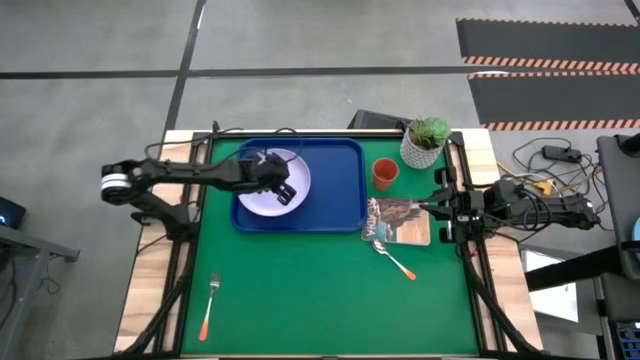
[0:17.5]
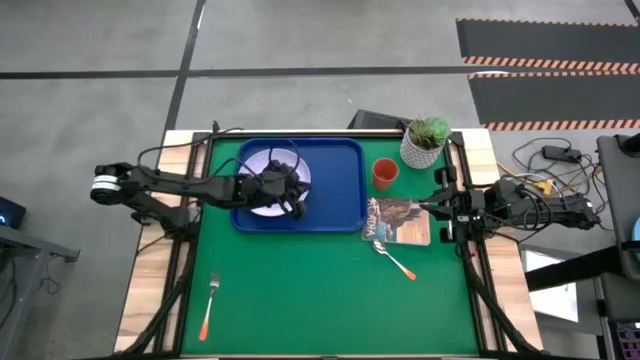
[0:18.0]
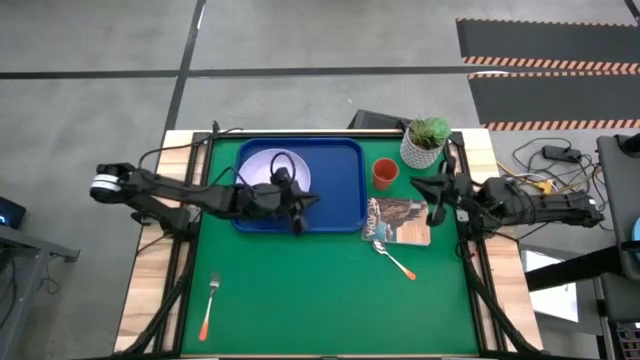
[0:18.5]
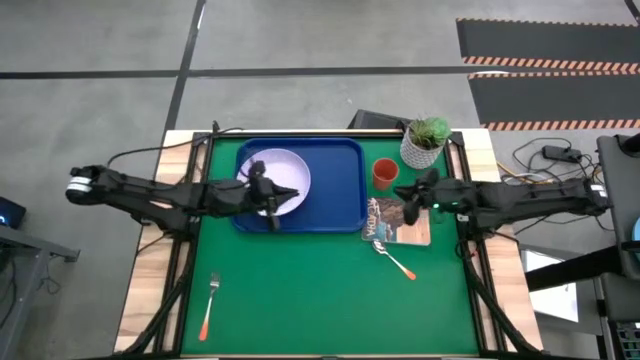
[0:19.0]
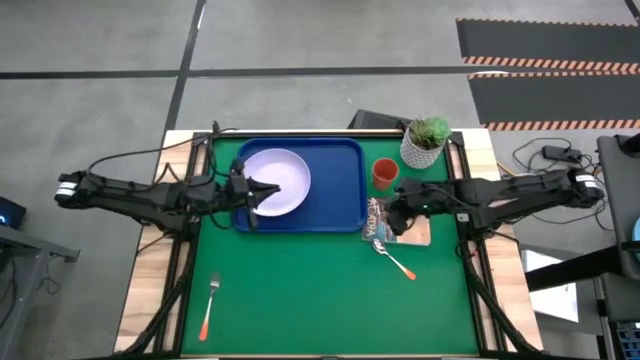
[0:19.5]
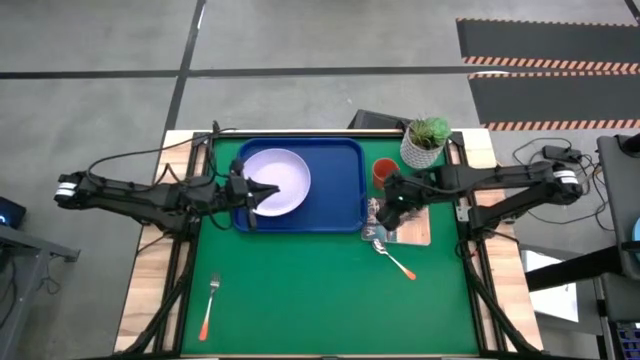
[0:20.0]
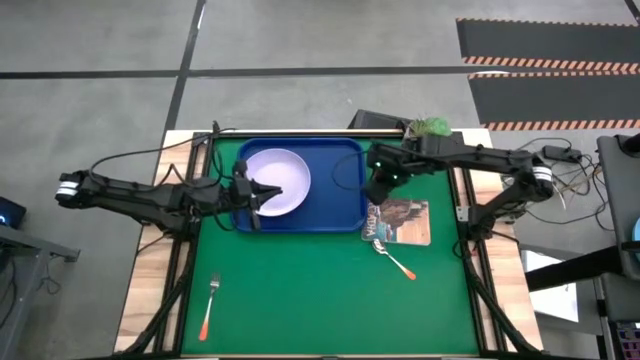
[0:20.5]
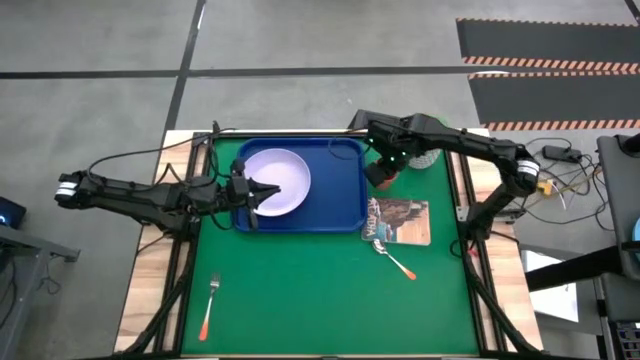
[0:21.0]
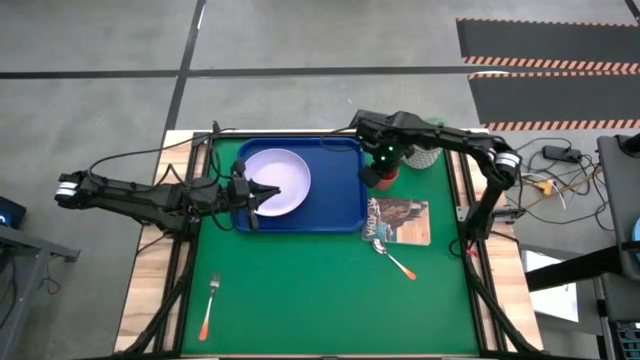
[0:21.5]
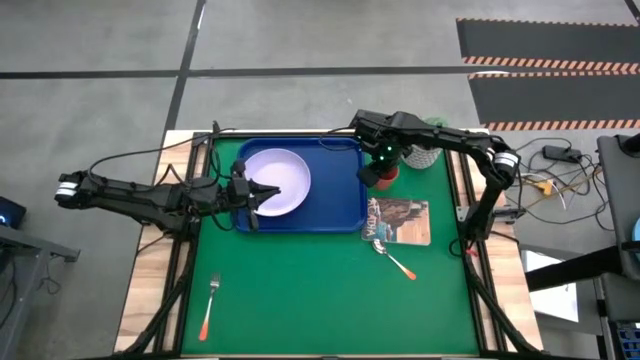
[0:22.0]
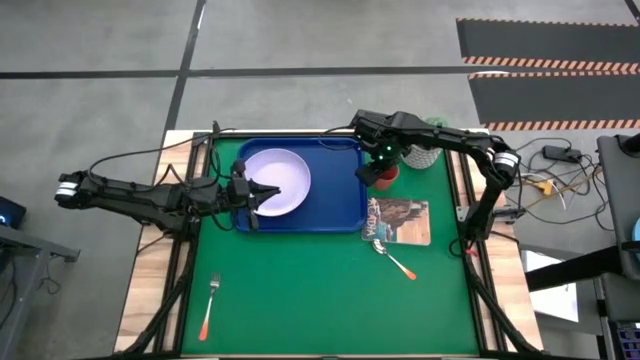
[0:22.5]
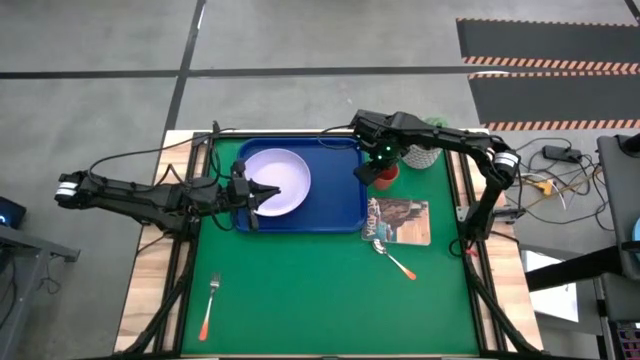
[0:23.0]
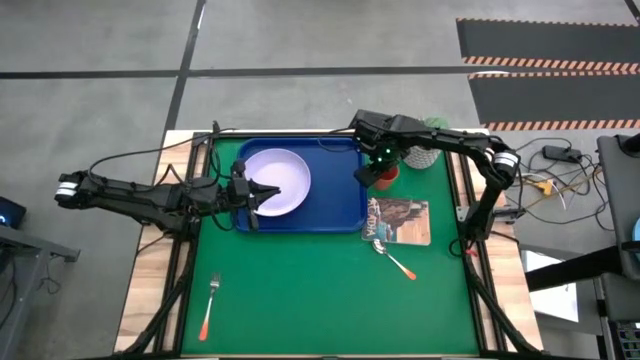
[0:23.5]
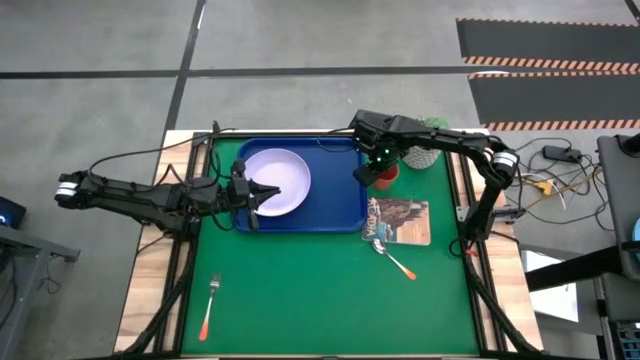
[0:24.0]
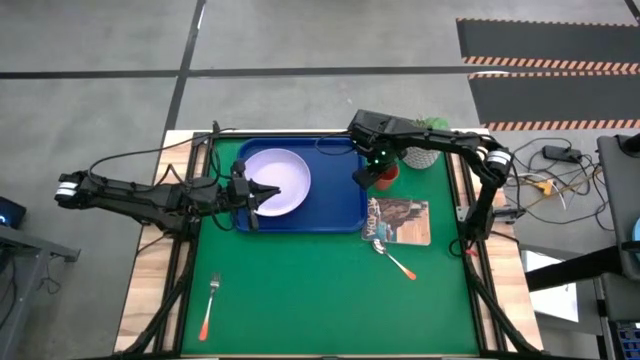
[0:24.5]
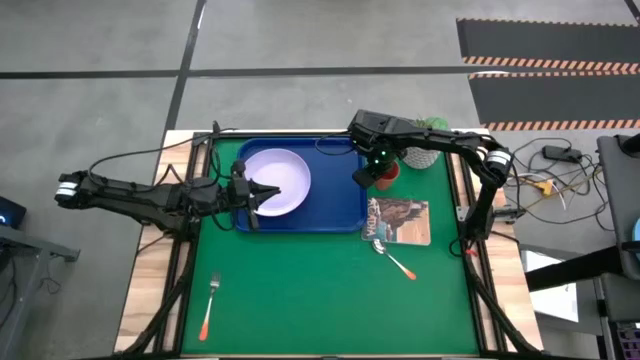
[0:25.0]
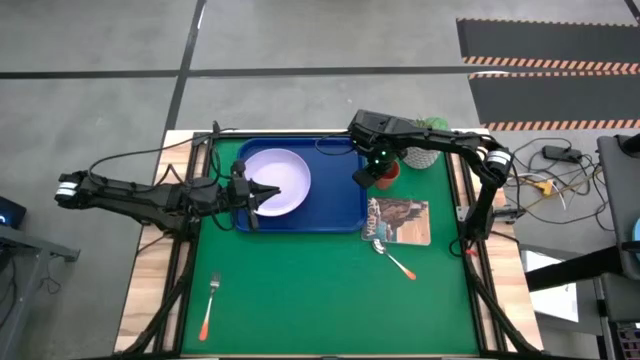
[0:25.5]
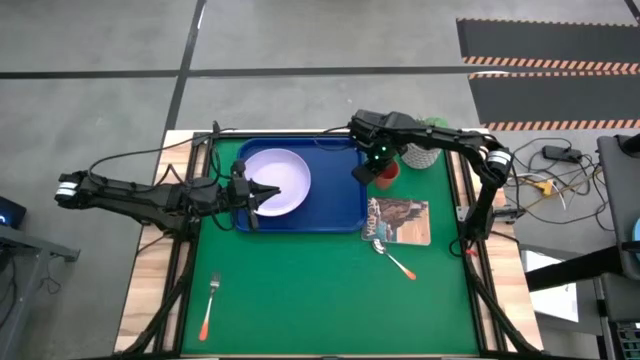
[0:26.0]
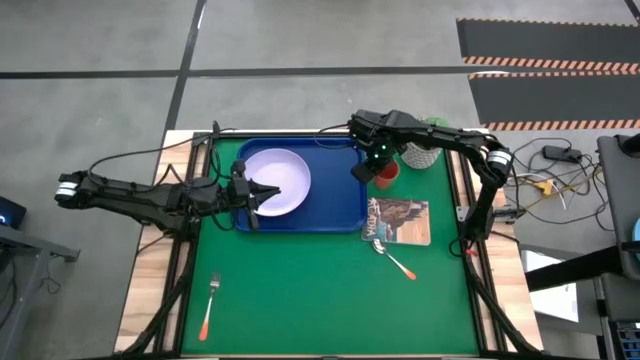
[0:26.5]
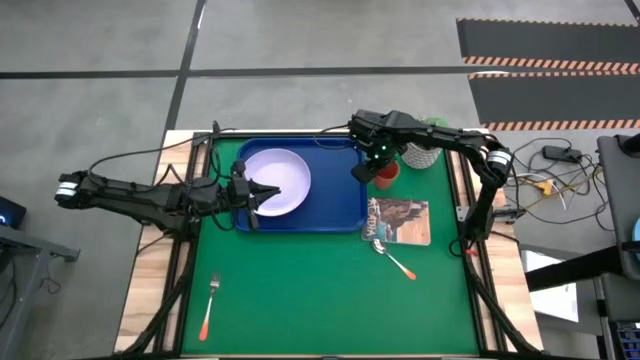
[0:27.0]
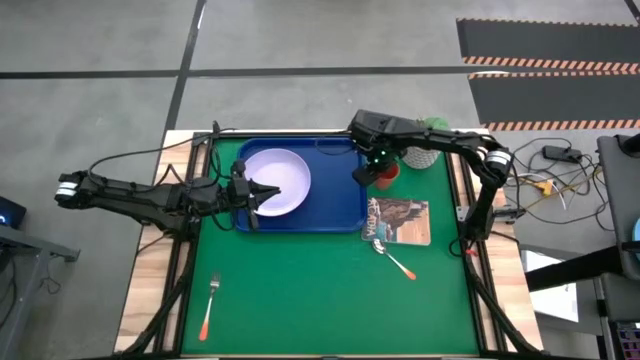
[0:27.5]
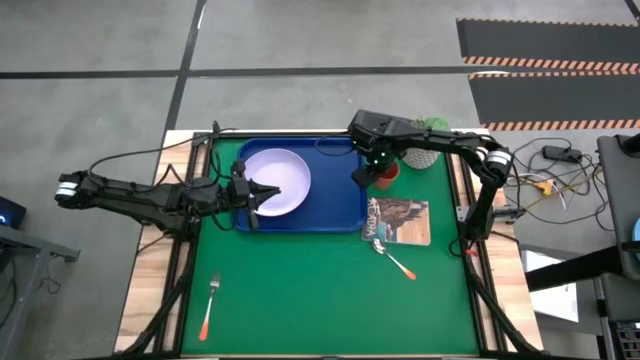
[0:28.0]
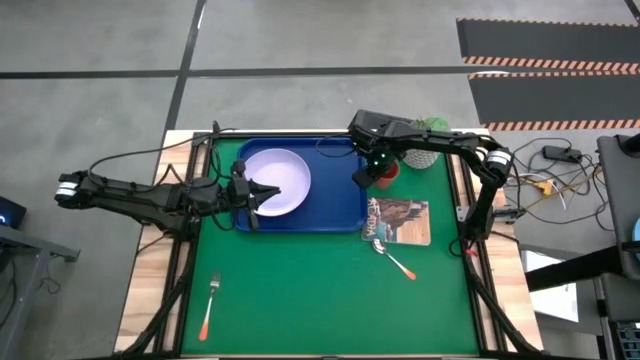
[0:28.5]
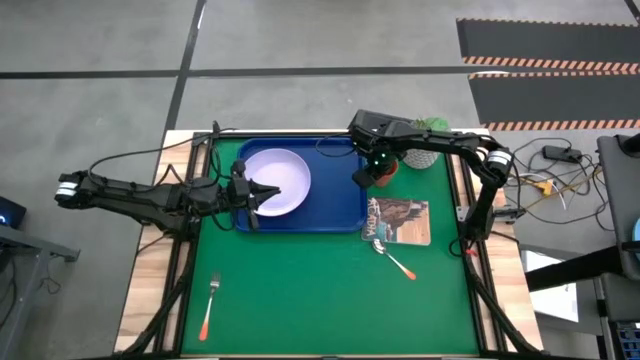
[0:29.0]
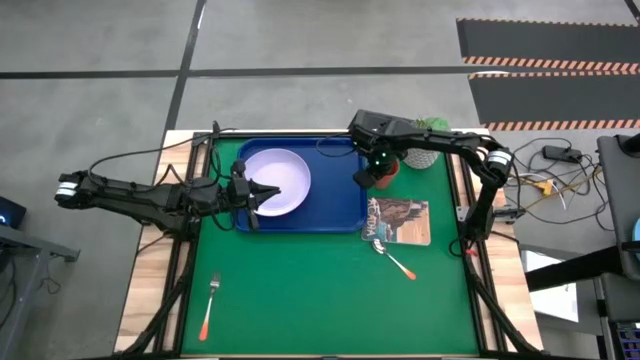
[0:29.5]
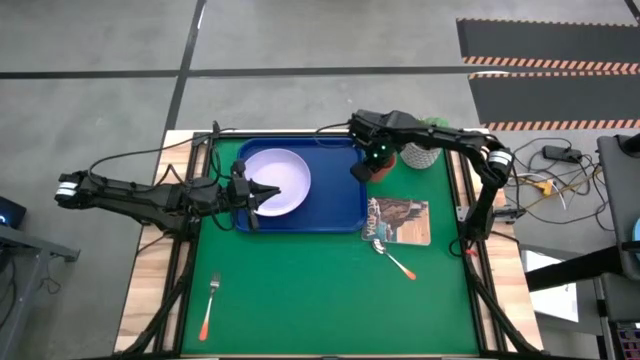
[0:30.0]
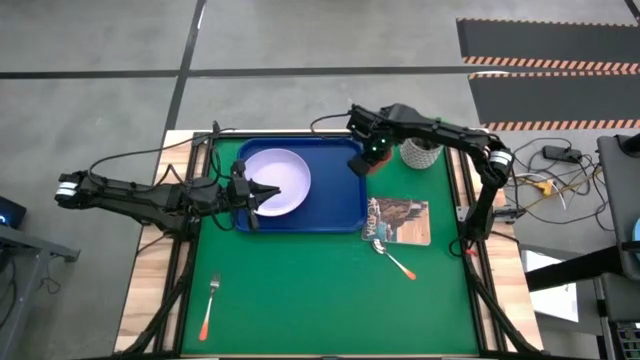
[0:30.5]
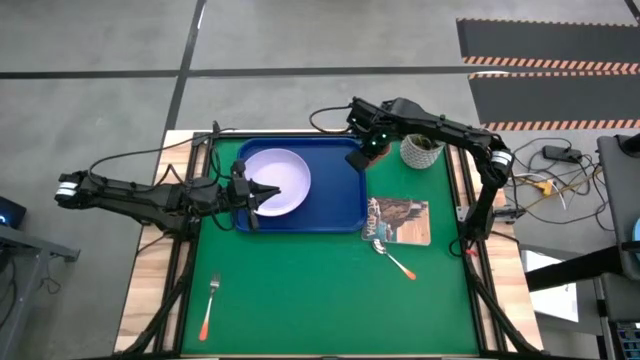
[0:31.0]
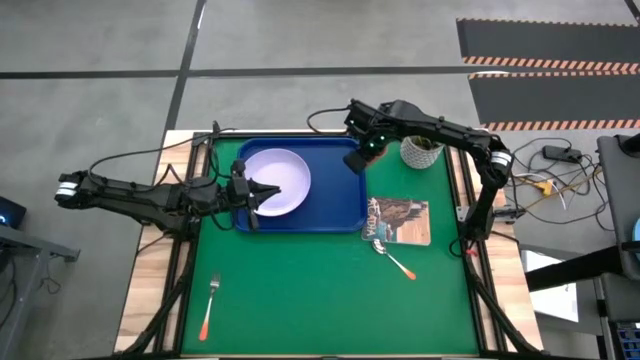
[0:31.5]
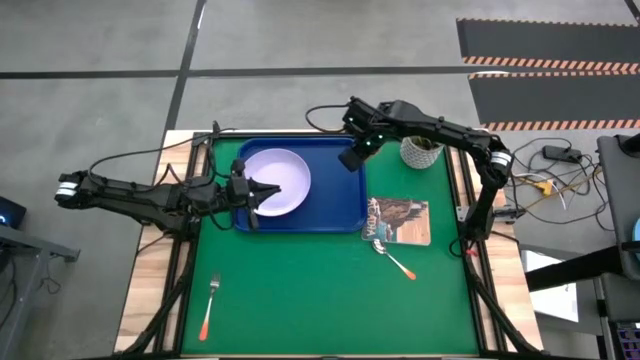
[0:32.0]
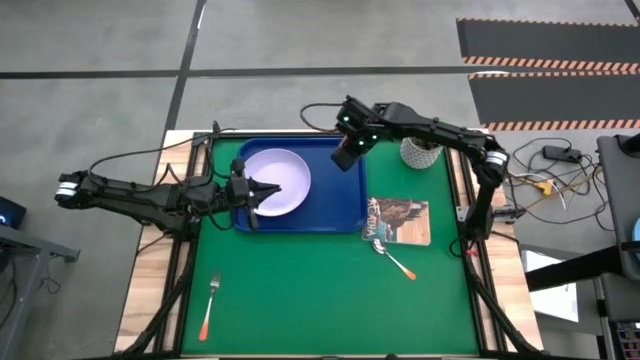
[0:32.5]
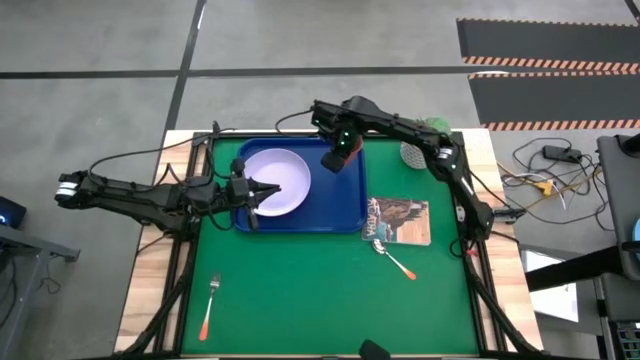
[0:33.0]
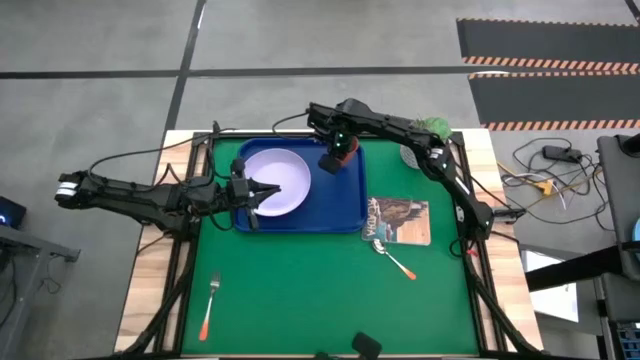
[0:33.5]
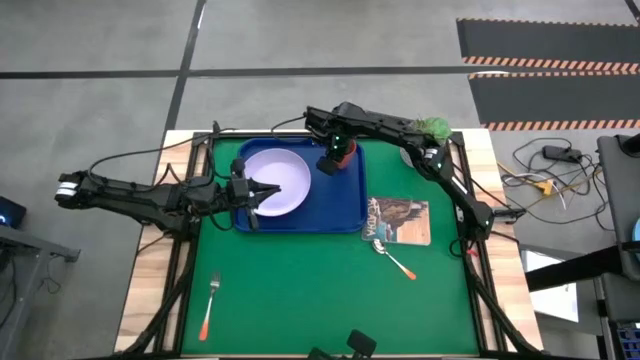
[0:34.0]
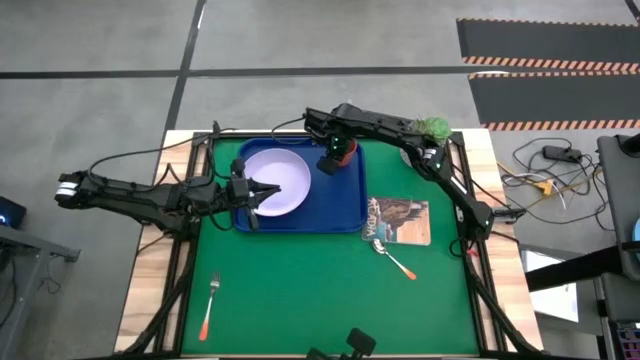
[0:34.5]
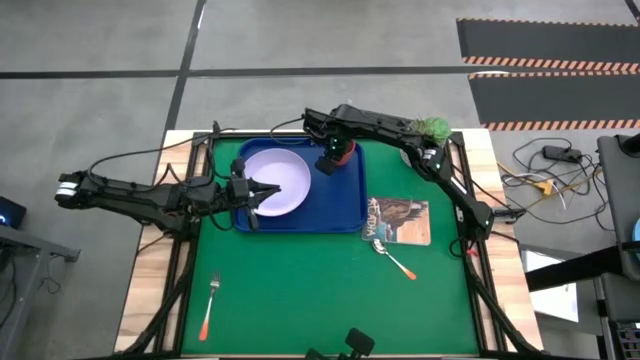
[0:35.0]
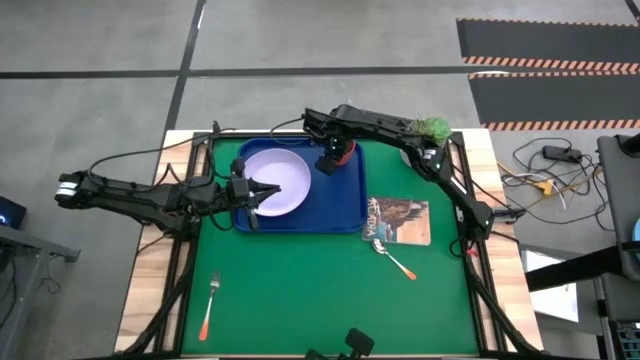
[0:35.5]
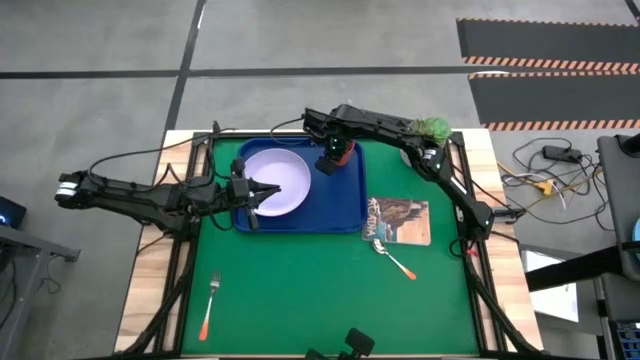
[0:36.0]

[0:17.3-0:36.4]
Task: Pick and place plate/cup/fork/spoon on tray
Put the orange cup on the top right of the blue serving tray

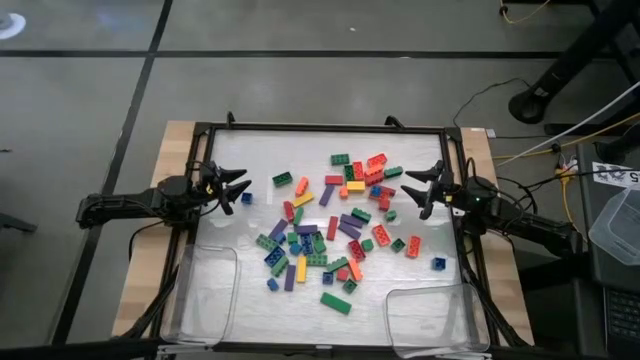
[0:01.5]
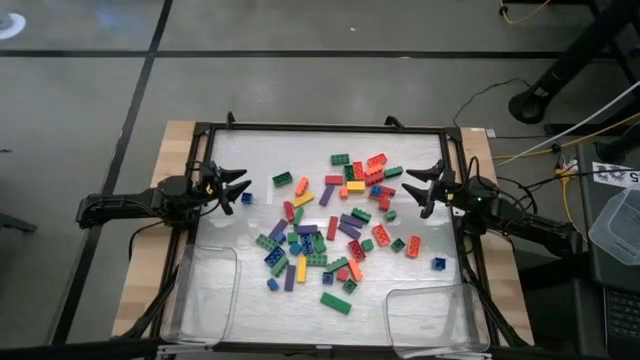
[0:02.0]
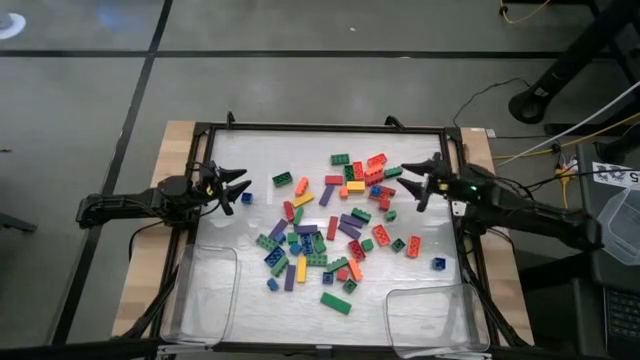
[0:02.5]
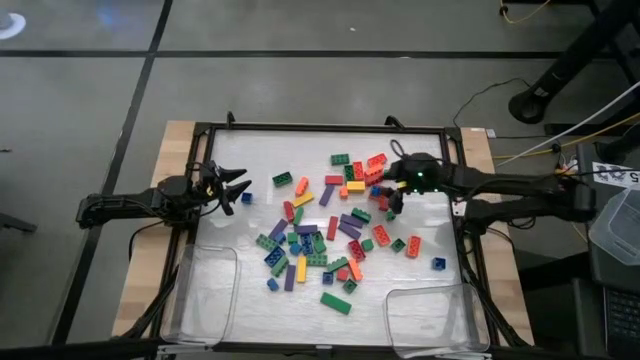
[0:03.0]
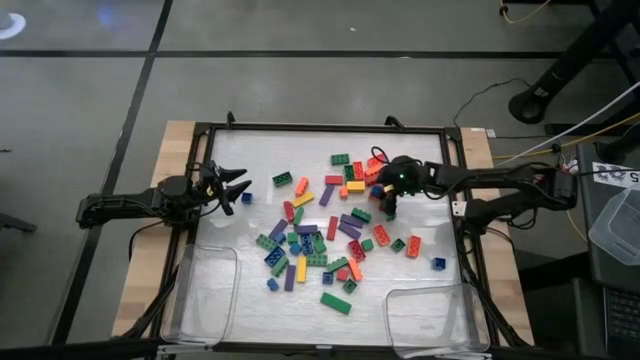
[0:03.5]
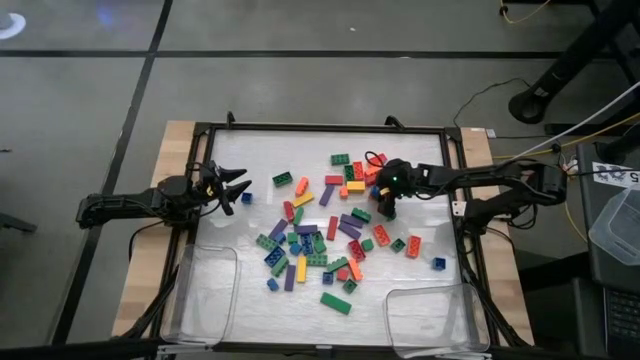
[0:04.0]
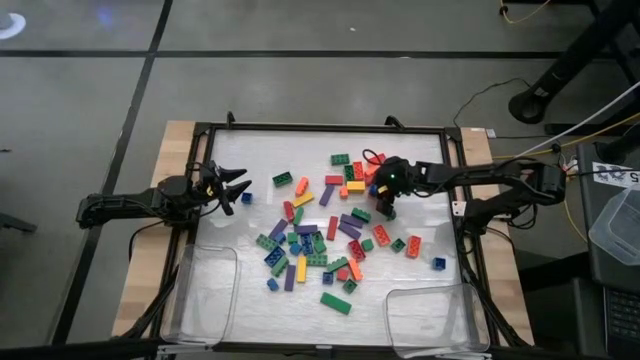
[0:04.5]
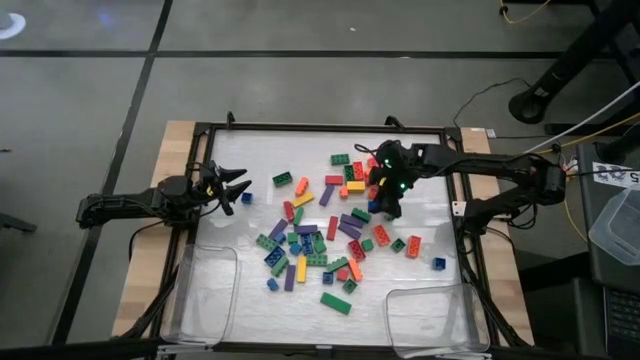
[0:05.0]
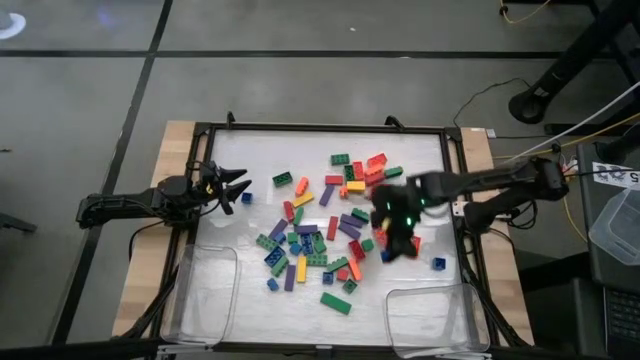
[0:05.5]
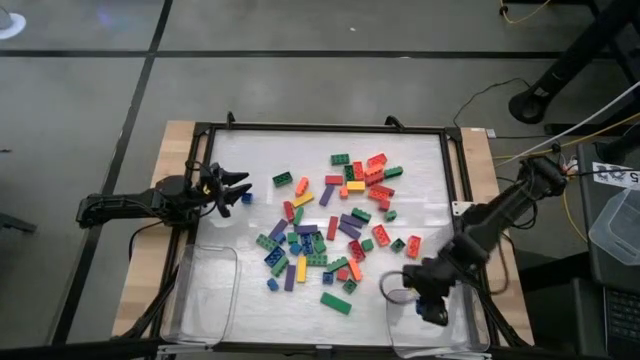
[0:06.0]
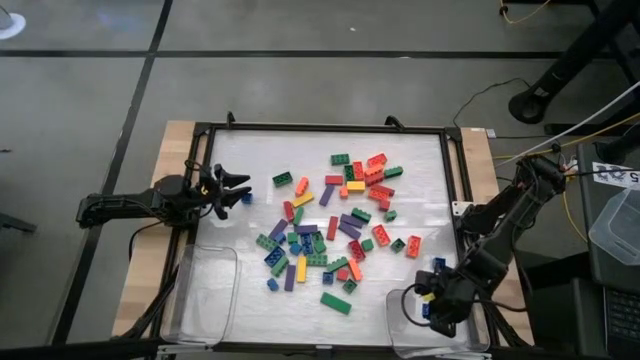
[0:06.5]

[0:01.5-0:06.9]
Task: Sort blocks by size
Put the small blue game piece into the right transparent bin
